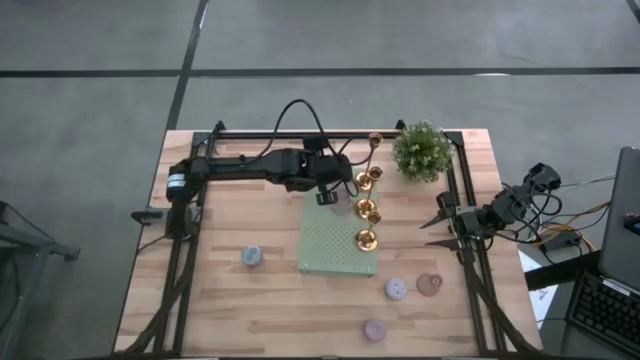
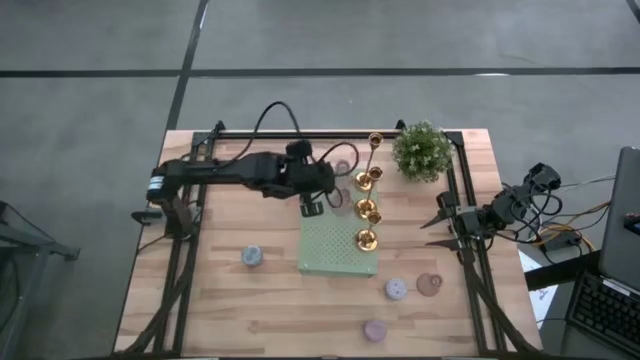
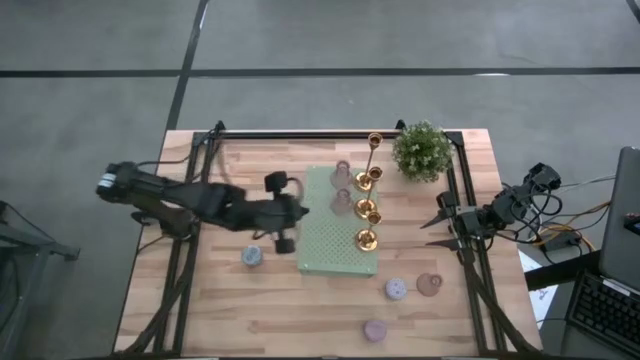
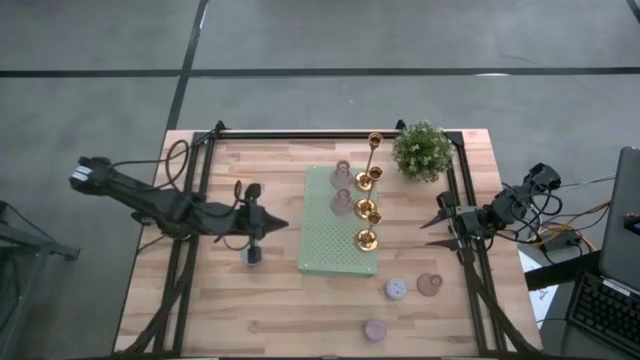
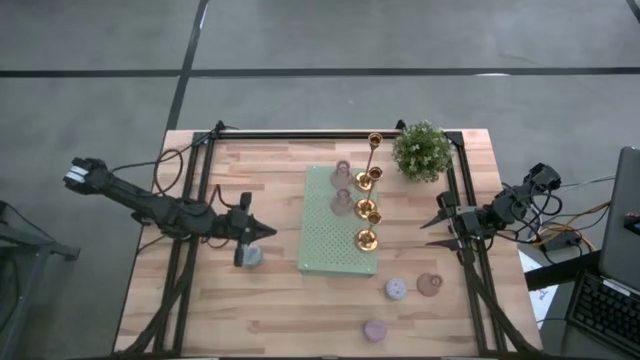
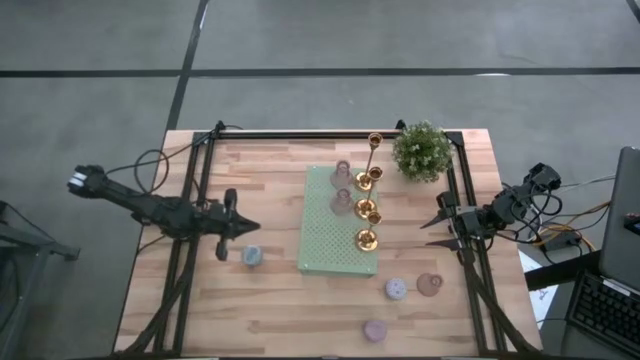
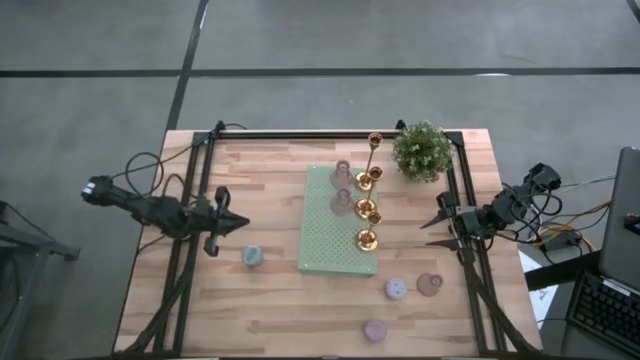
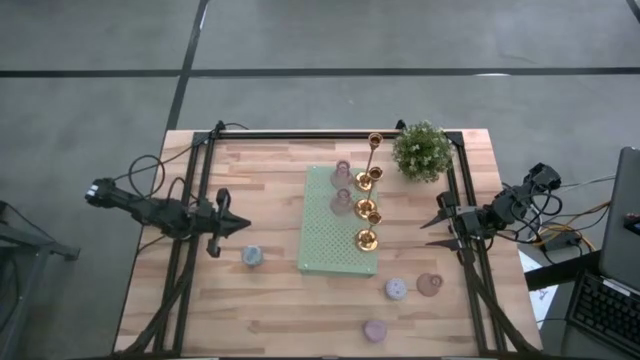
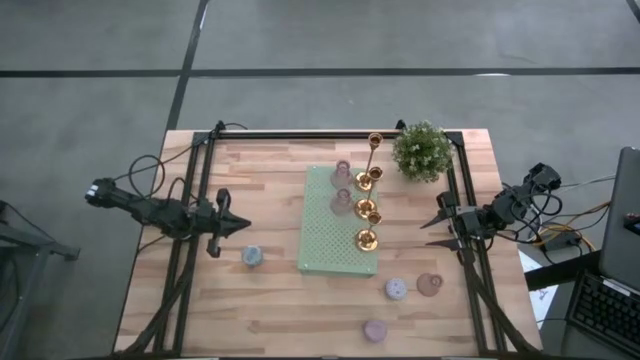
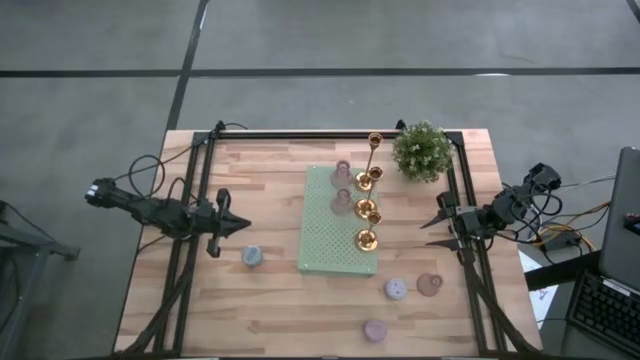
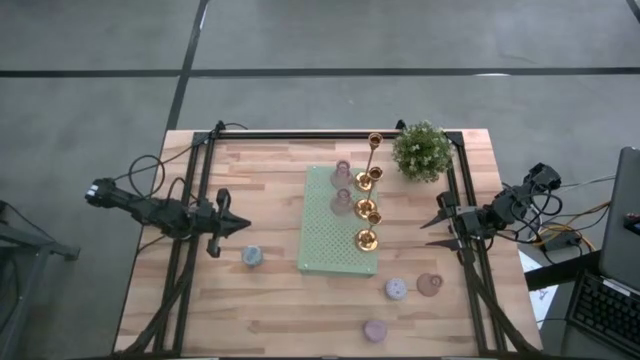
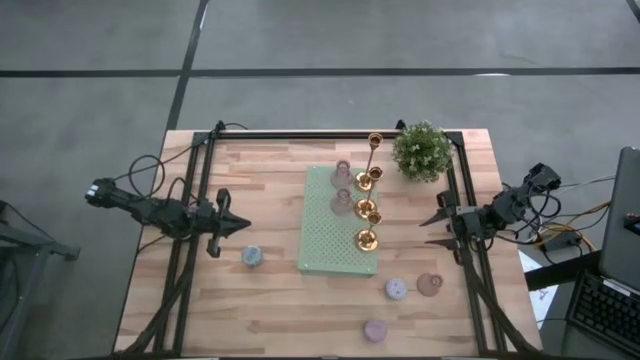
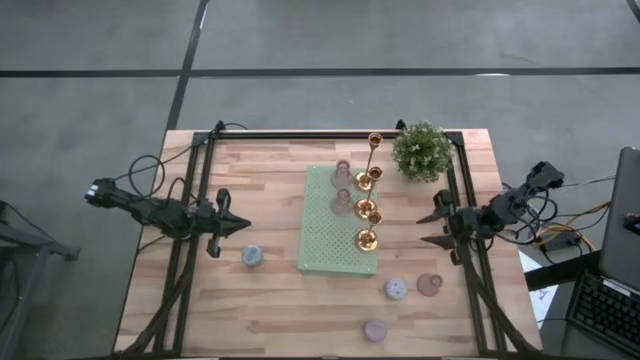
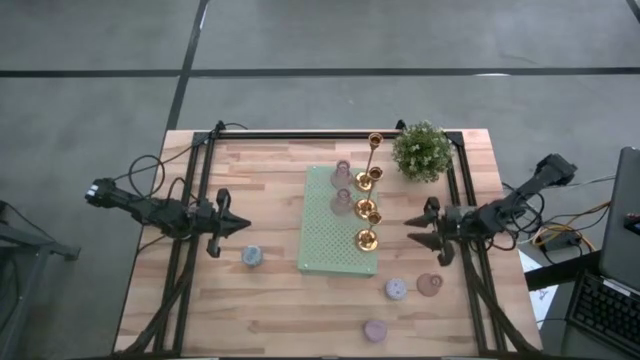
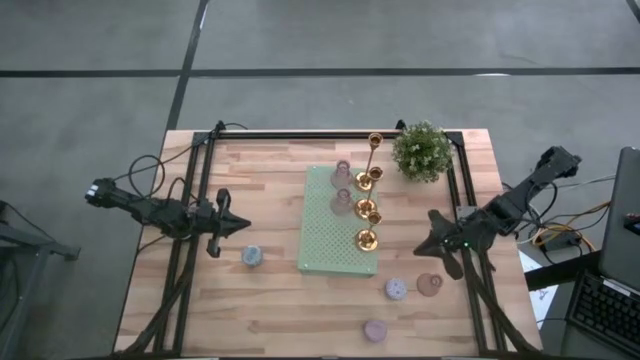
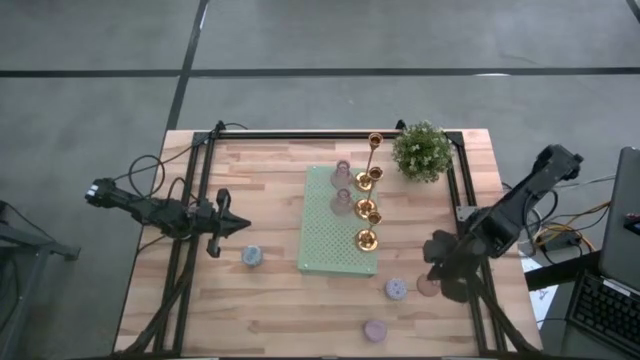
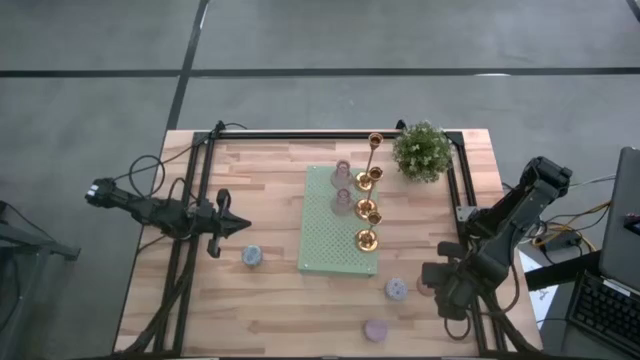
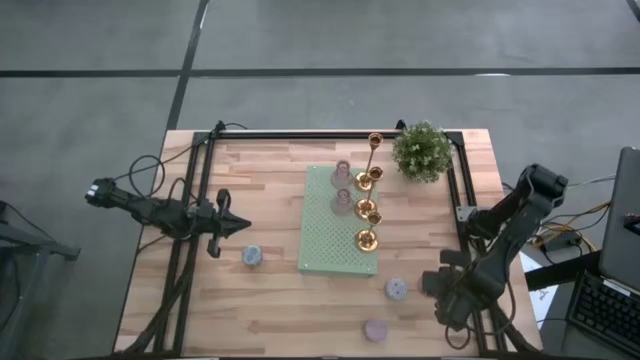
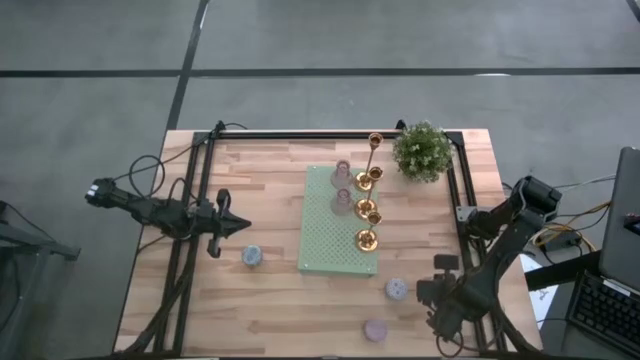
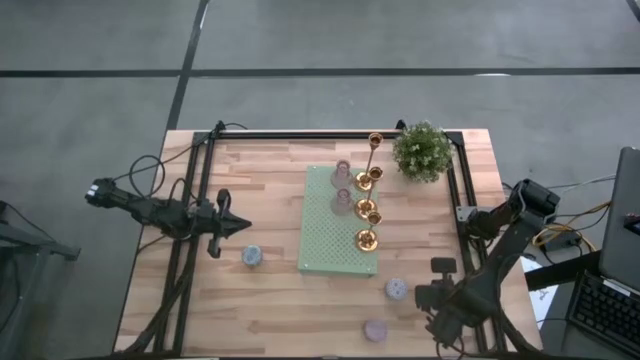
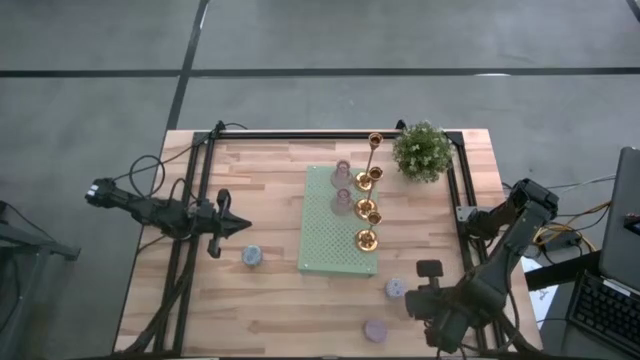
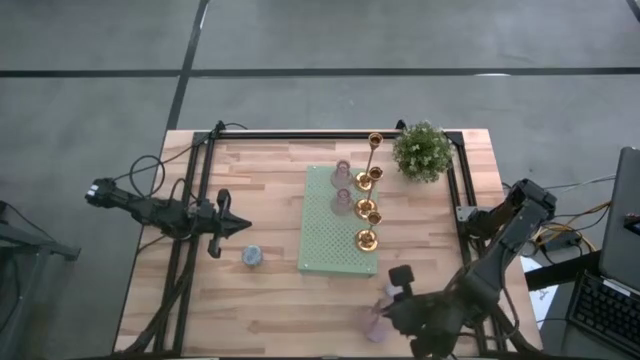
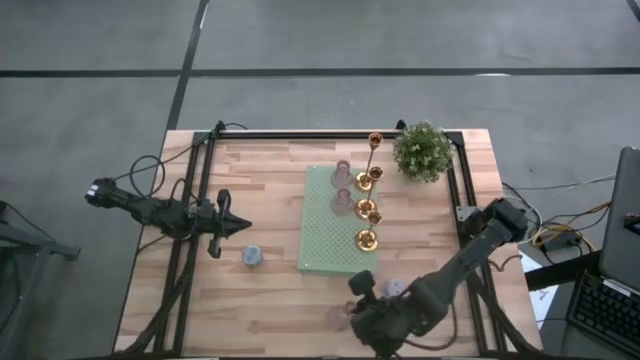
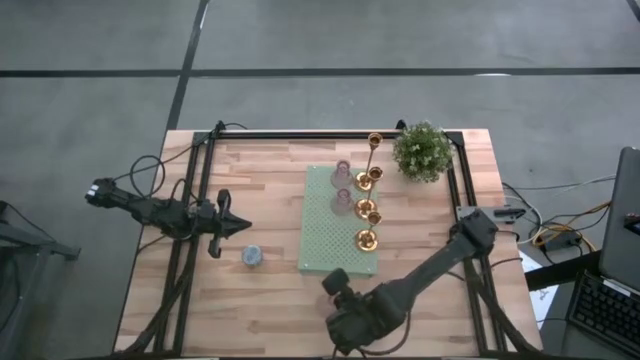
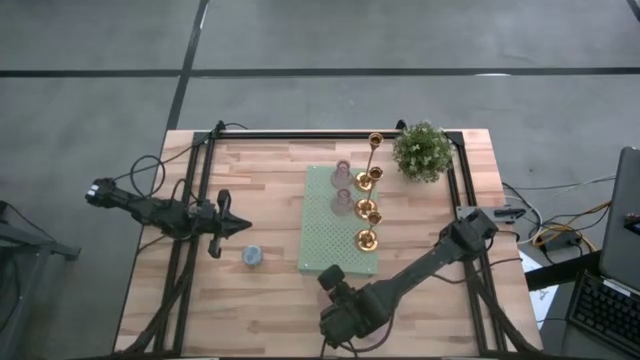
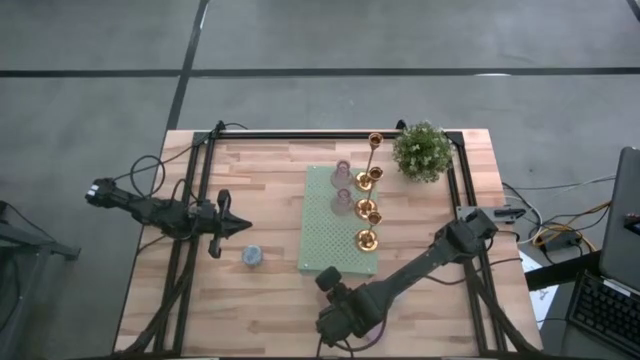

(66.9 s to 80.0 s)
Task: Pick & Place candle stick holders
Put the purple vase on the shelf aligned with the other purple vase

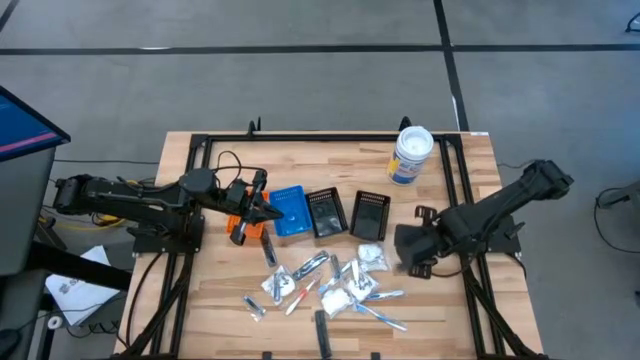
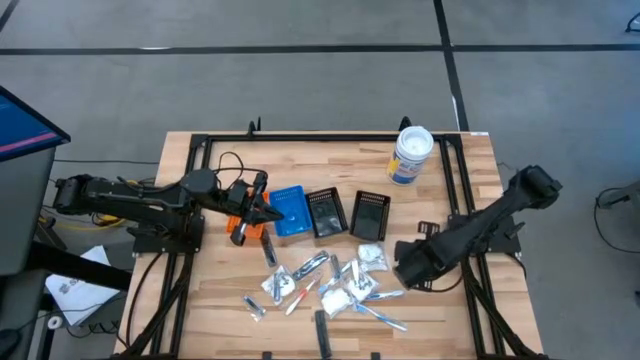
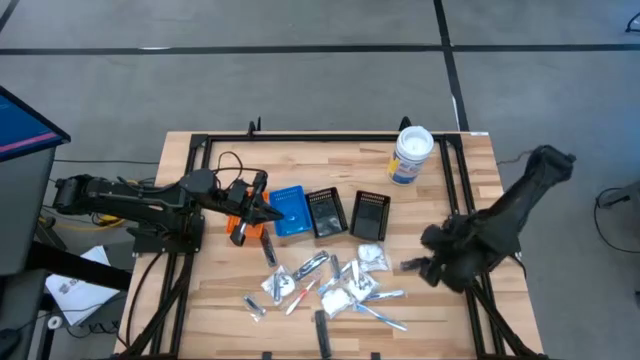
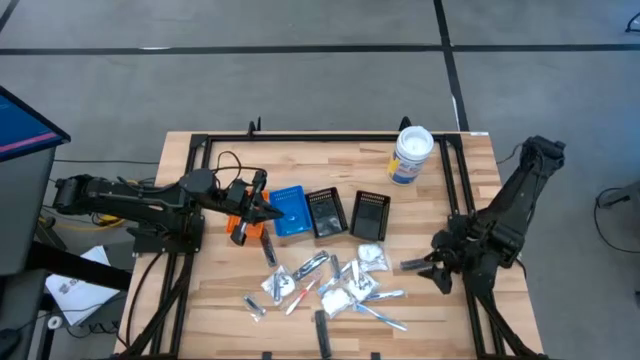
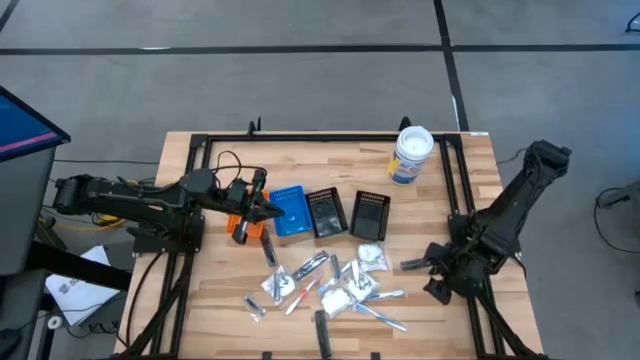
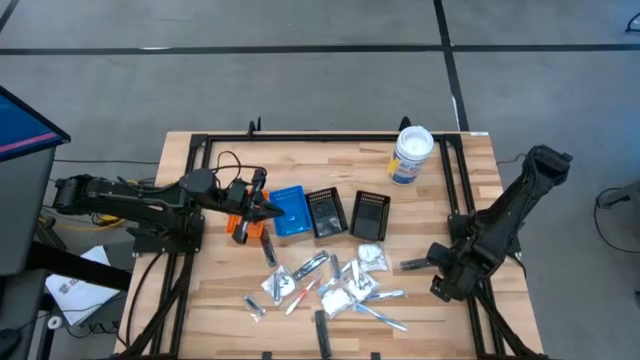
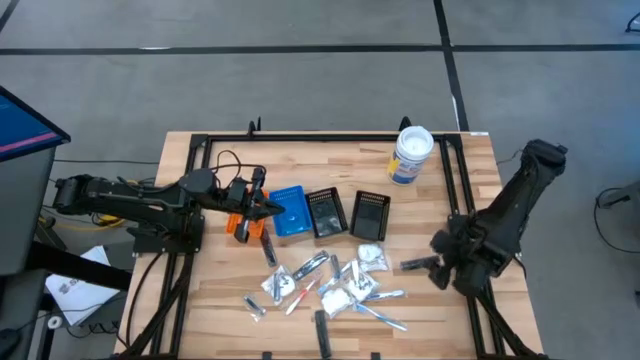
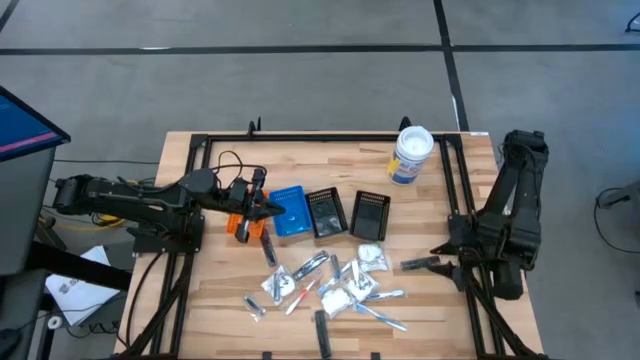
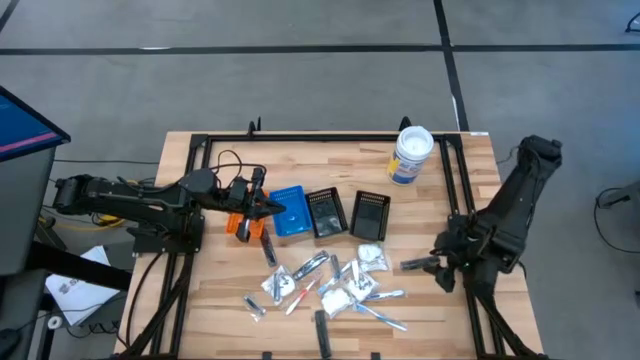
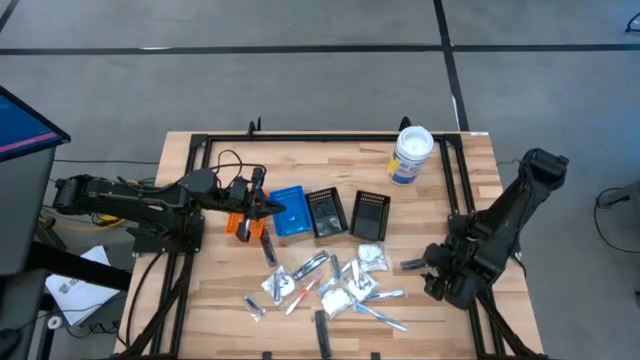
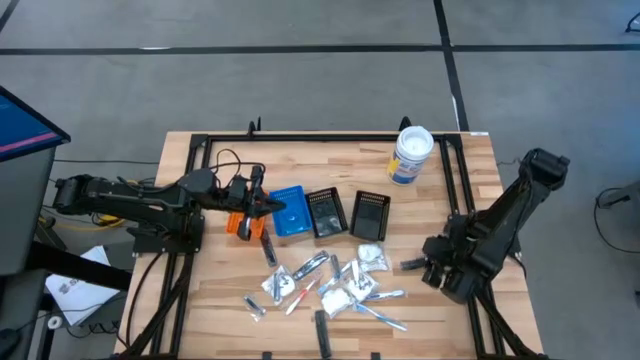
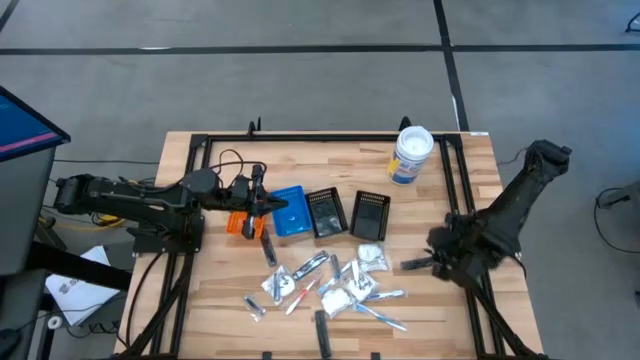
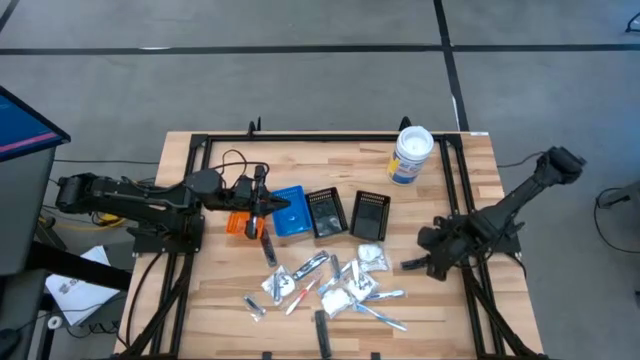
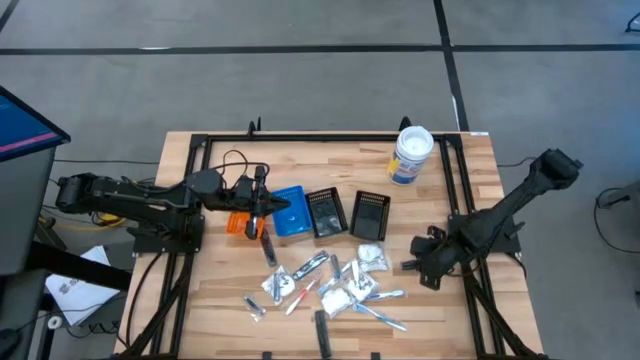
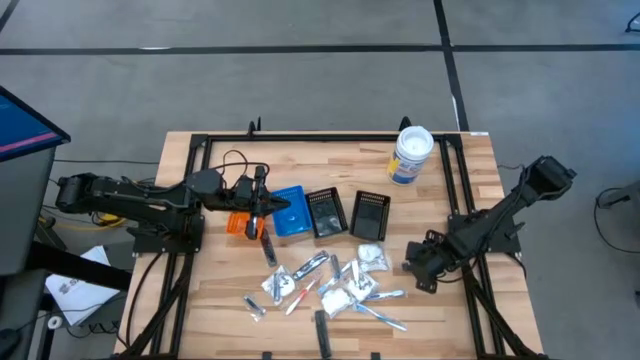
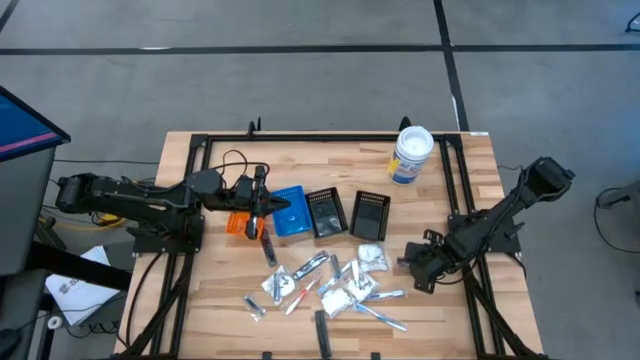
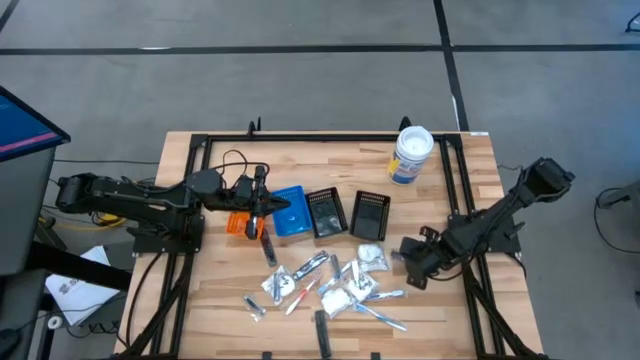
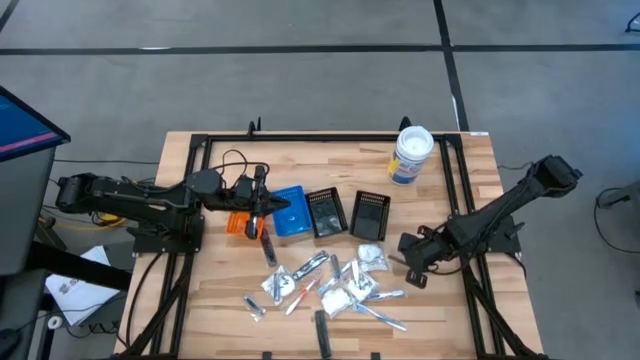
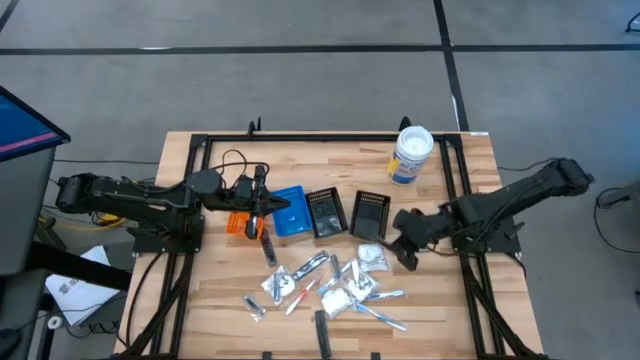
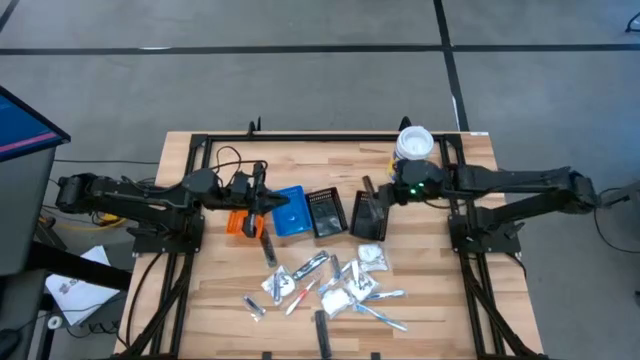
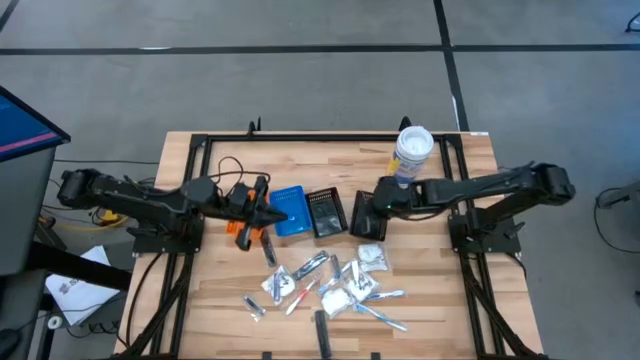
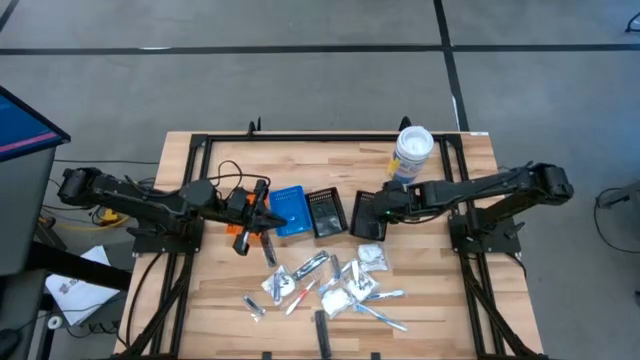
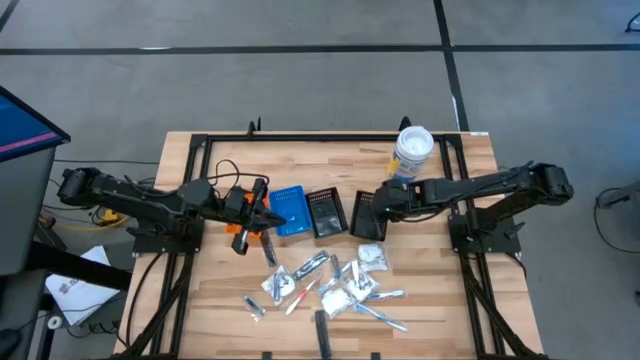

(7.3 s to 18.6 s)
Task: Pick & Place Travel size toiletries
Put the black comb into the right black bin
